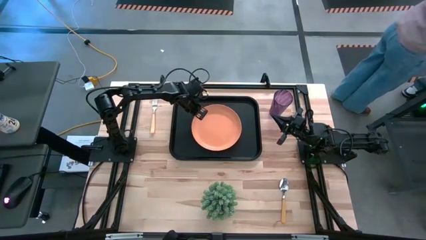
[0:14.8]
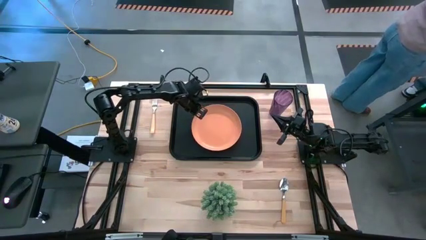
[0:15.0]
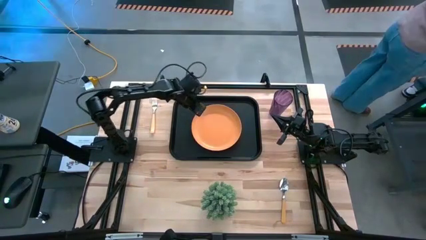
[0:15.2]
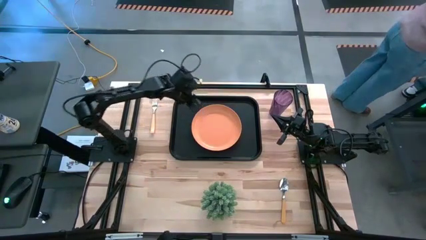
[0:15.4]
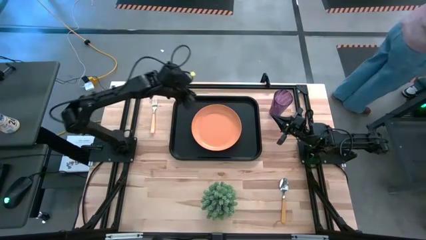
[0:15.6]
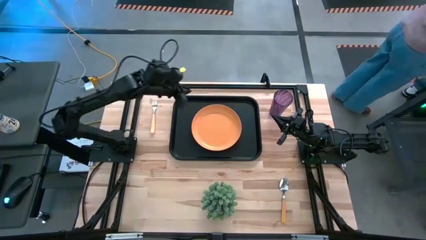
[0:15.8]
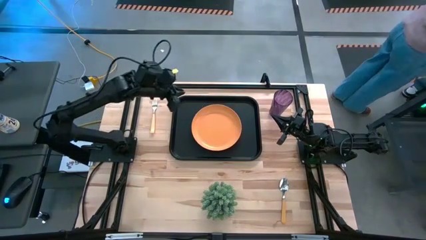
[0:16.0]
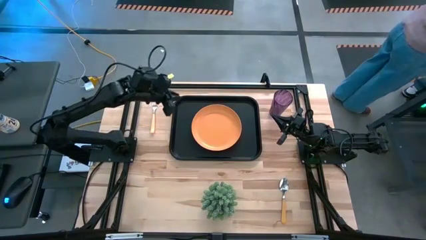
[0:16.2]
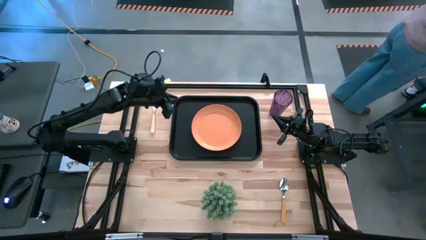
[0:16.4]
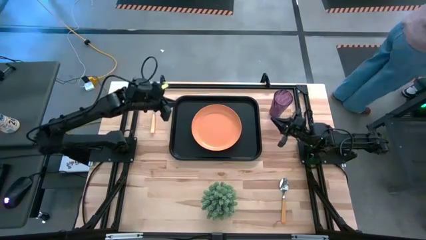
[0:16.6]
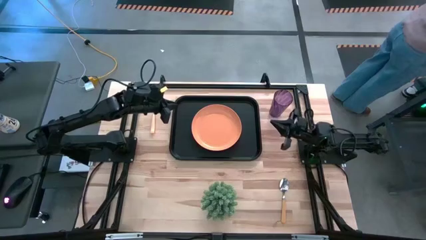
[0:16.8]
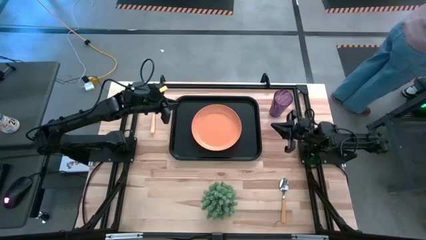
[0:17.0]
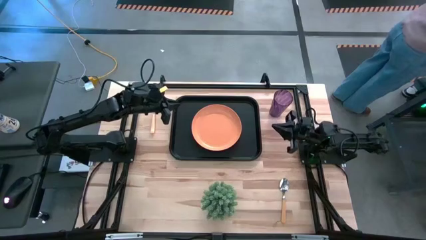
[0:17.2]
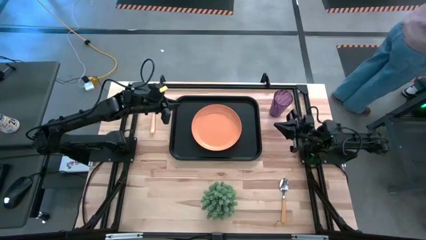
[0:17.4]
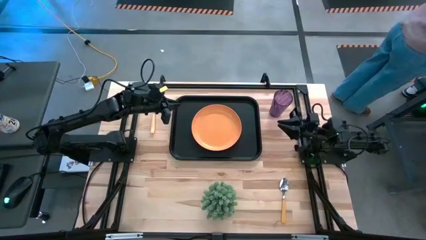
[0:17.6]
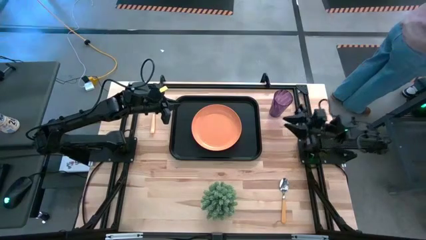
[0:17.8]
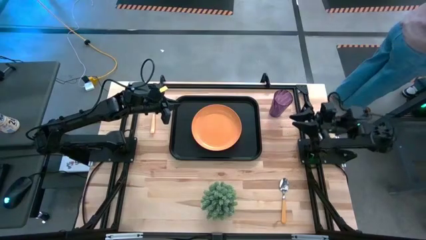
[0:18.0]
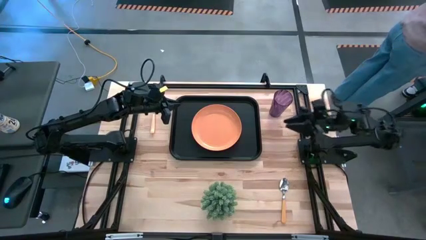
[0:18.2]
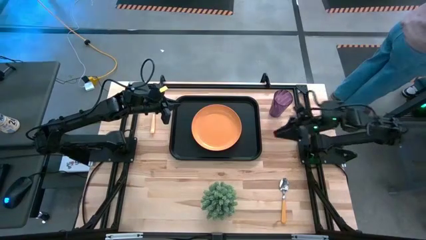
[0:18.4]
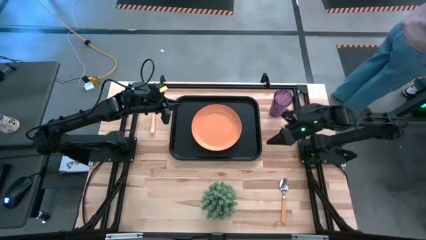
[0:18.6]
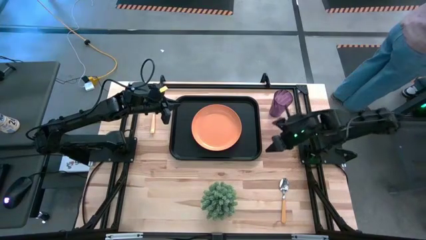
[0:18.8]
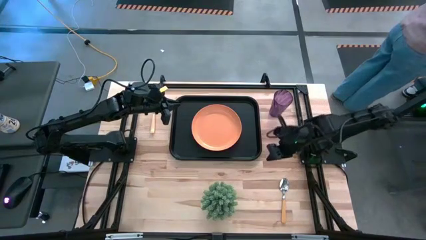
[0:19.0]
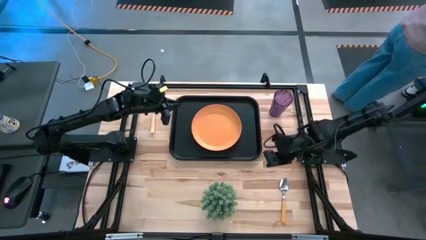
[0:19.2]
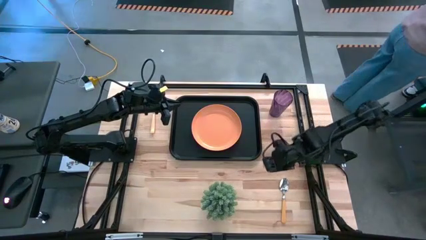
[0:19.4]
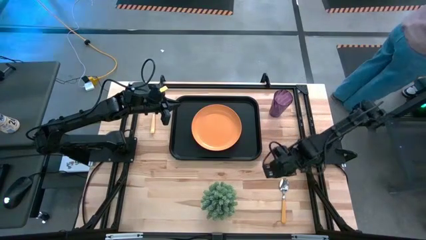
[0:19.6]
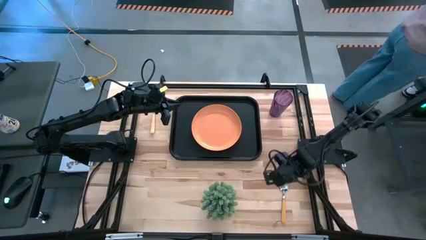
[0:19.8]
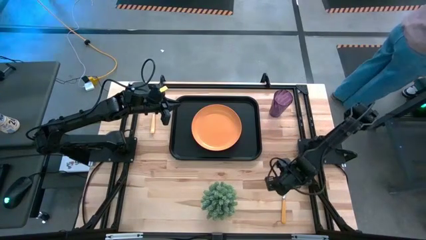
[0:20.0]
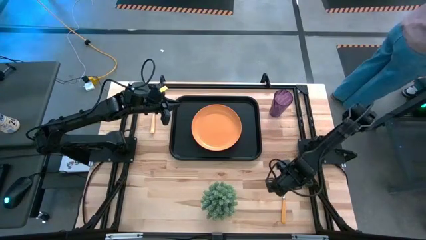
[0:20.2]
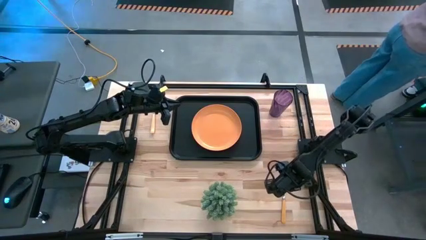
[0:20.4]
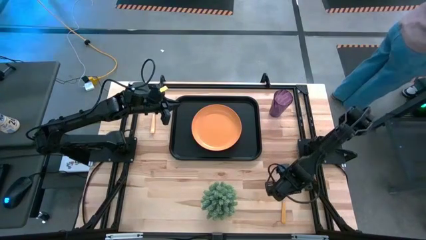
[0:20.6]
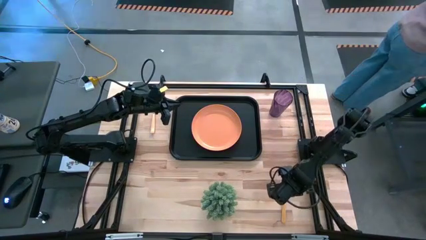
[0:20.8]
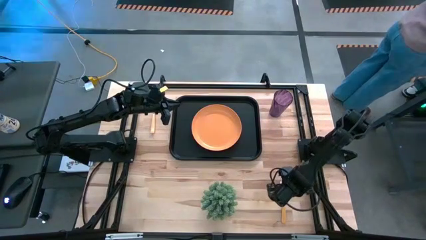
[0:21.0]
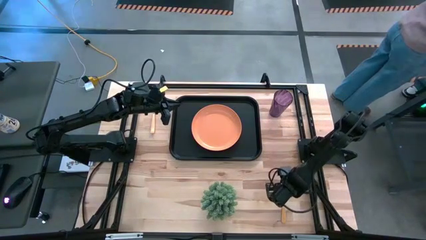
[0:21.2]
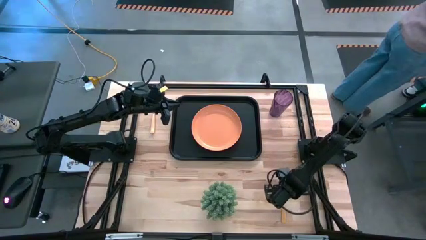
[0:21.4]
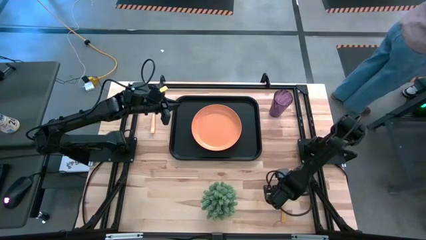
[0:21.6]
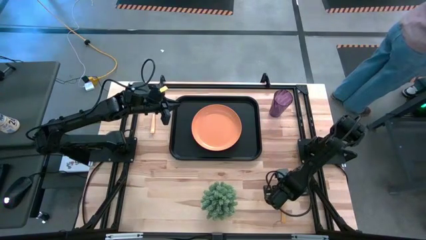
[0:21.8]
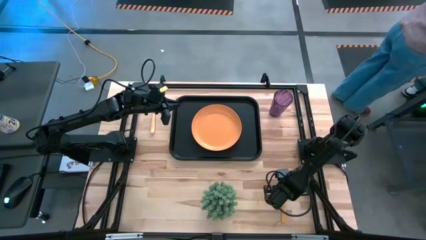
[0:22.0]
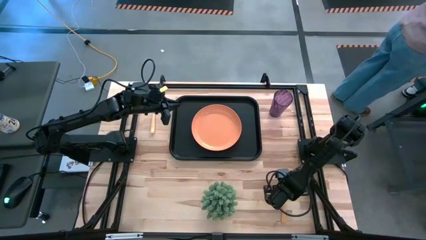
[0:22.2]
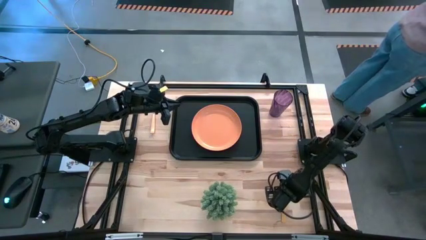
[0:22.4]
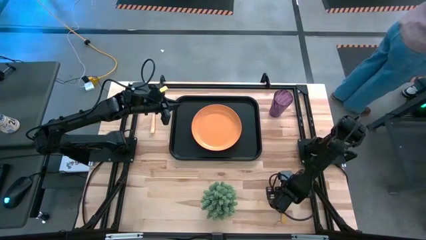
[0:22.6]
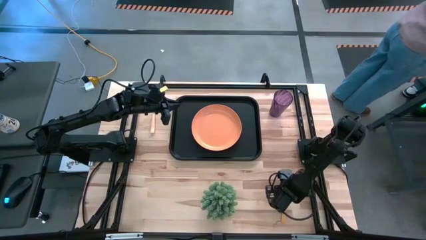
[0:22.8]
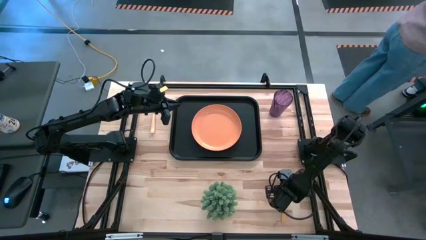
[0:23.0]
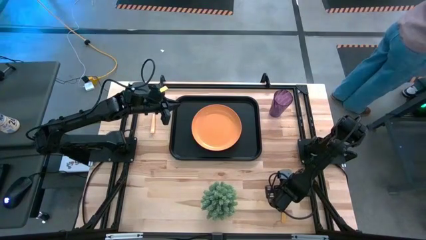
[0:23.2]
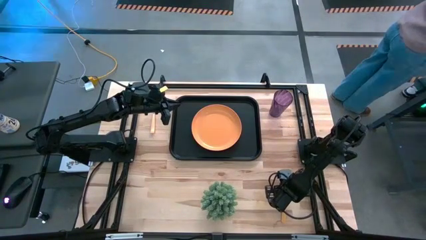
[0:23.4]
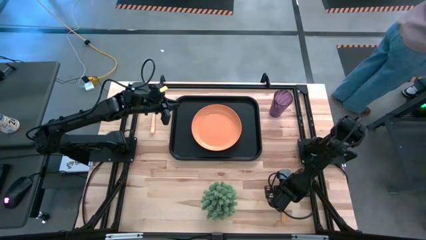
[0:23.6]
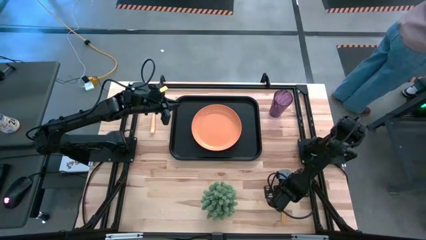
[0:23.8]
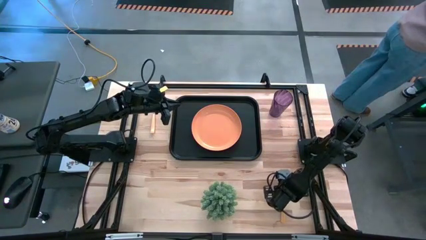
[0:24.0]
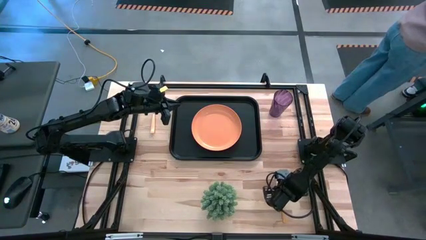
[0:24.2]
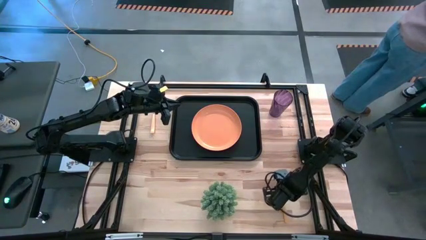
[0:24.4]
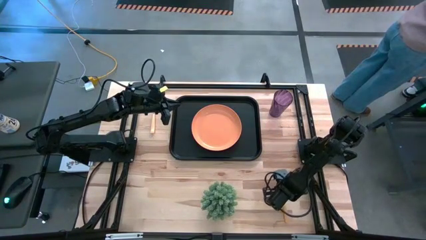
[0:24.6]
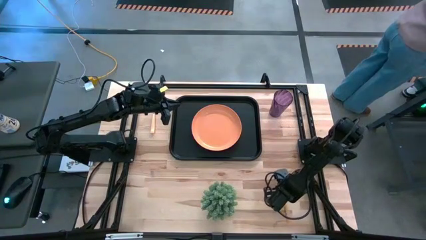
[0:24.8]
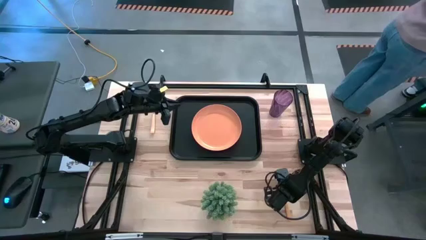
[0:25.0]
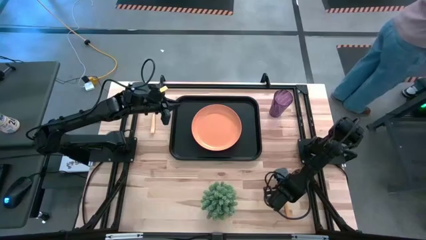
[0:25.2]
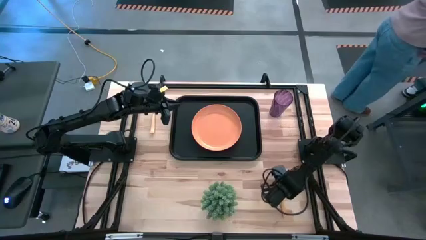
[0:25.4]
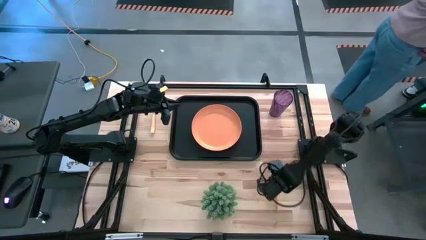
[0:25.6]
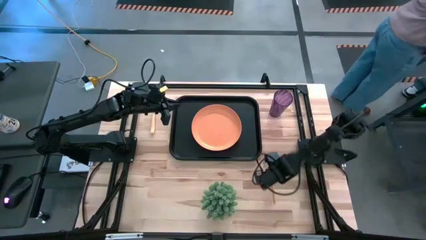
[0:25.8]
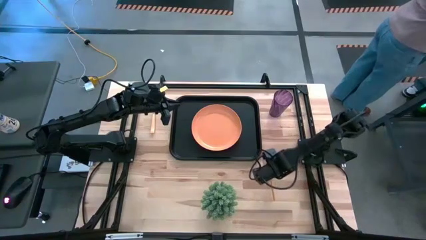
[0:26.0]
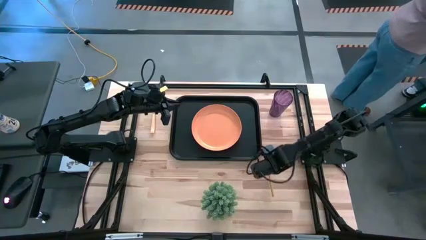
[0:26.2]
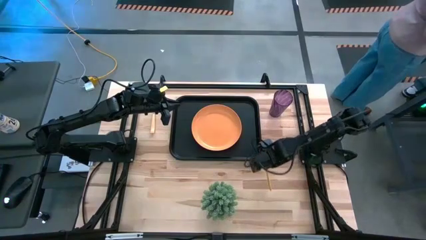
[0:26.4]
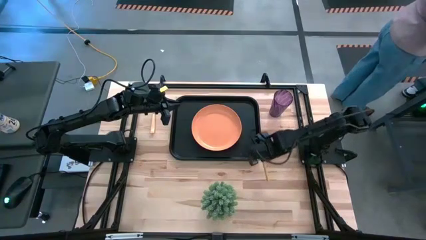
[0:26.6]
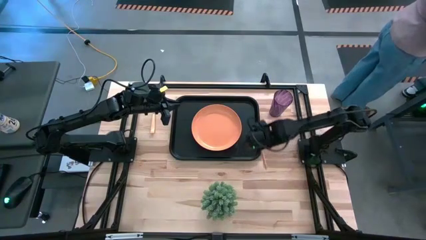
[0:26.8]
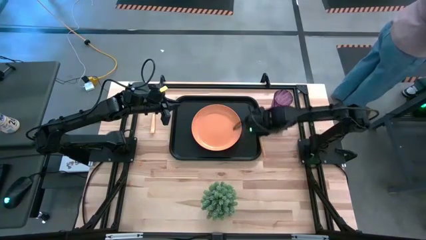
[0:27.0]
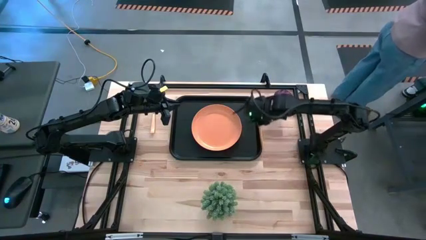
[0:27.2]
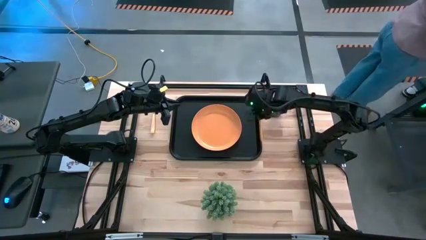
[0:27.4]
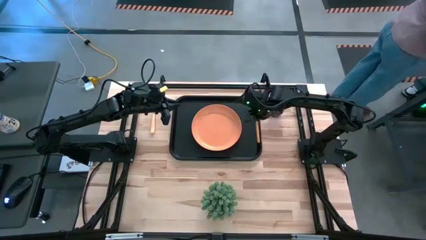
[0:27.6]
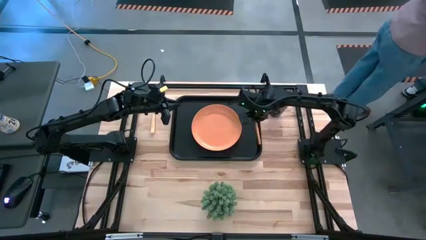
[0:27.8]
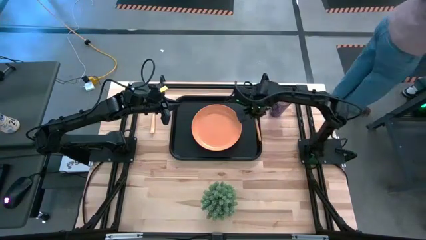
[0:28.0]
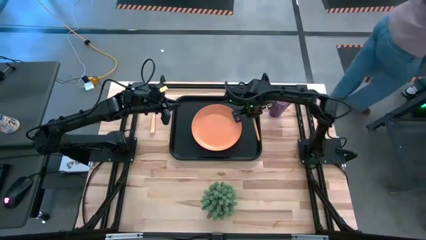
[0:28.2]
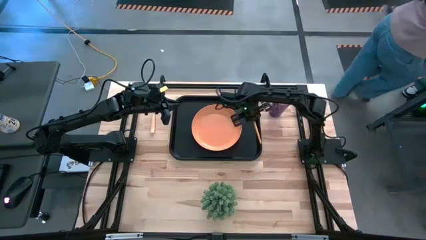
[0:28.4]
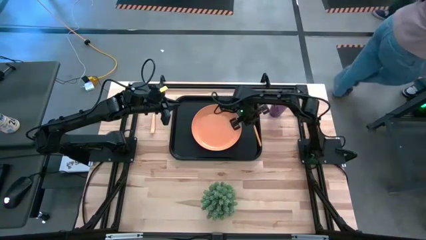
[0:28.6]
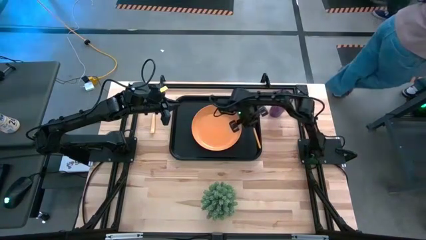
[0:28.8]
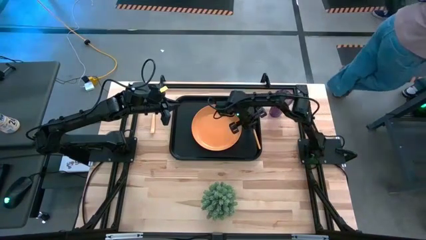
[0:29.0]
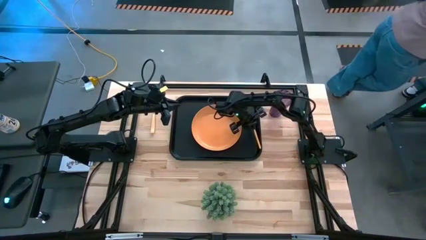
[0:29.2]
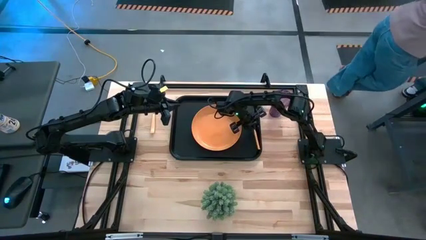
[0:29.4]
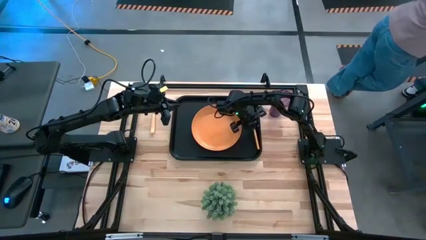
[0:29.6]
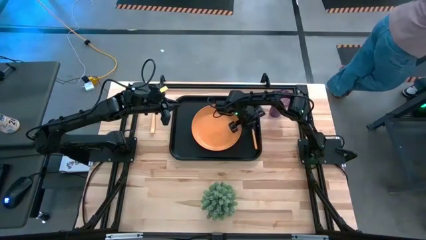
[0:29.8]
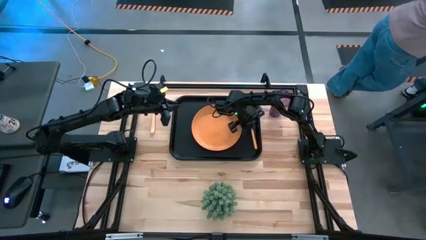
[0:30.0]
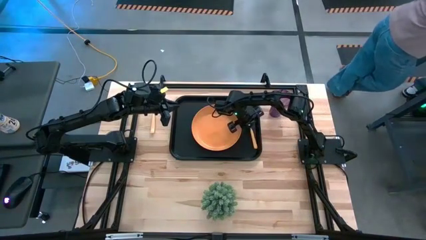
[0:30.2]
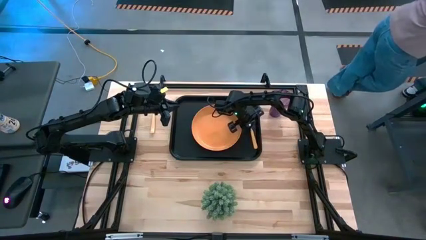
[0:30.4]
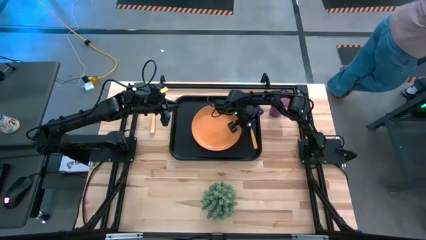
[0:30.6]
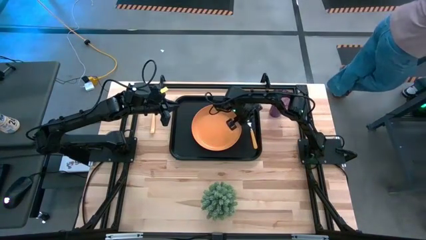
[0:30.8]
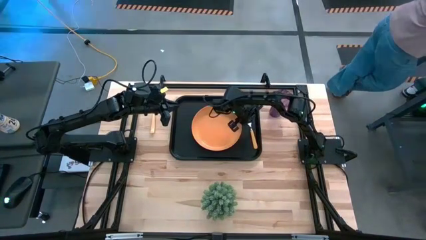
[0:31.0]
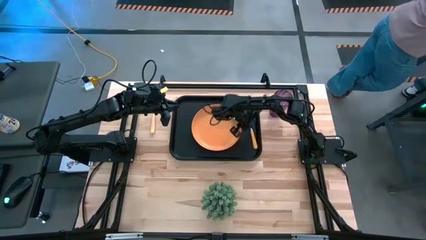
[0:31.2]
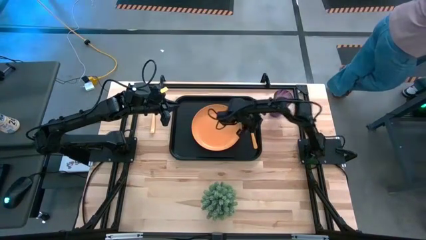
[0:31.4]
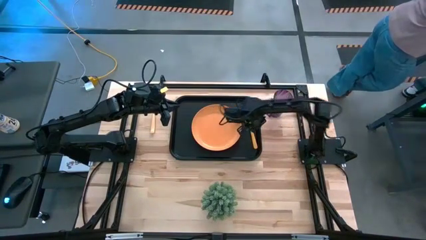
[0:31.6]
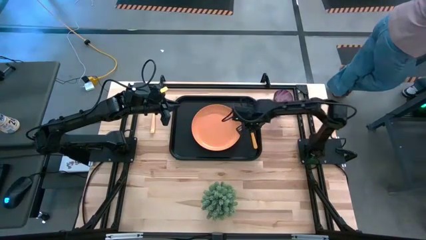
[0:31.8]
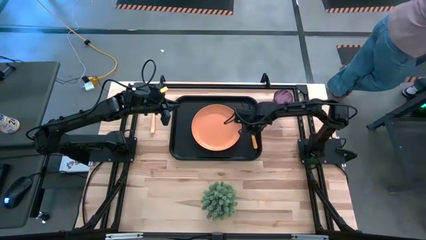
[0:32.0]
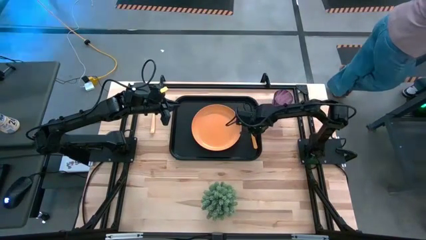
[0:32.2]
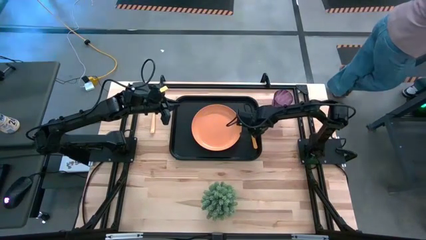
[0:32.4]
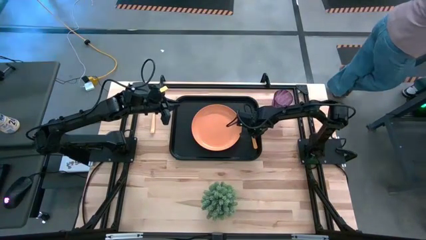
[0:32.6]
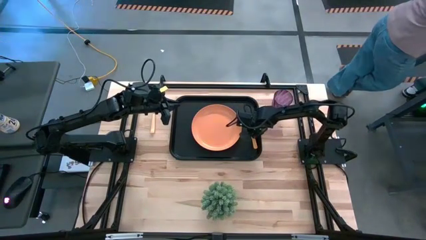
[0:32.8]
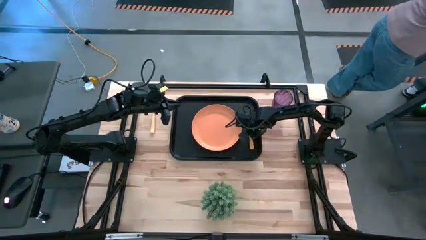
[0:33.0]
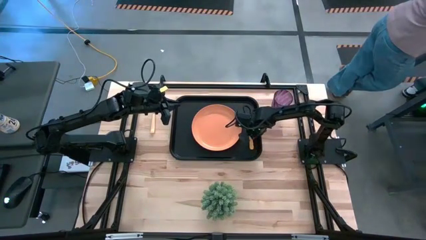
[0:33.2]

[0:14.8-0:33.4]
Task: Pick and place plate/cup/fork/spoon on tray
Put the orange spoon on the black tray
